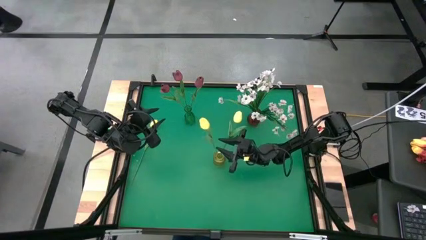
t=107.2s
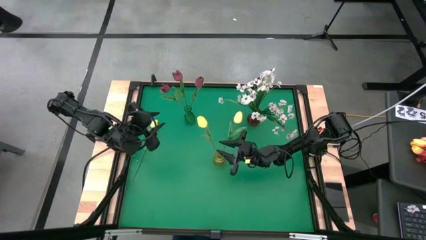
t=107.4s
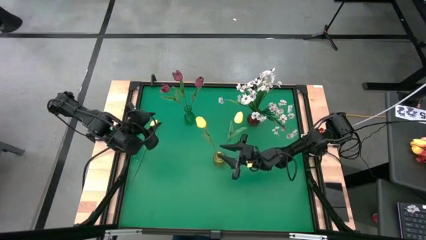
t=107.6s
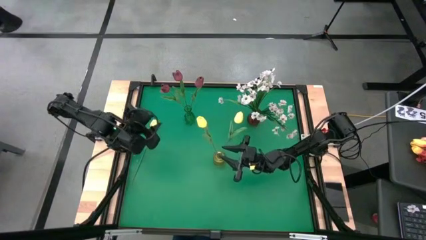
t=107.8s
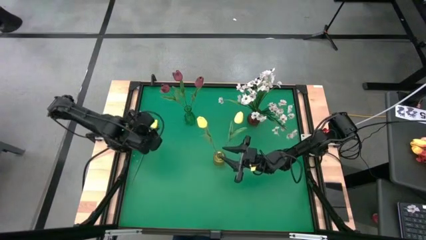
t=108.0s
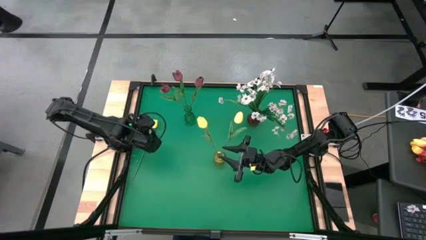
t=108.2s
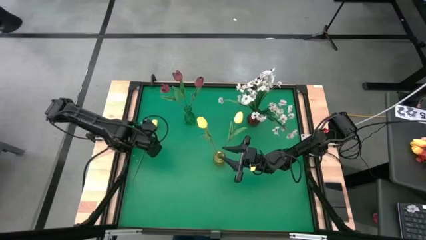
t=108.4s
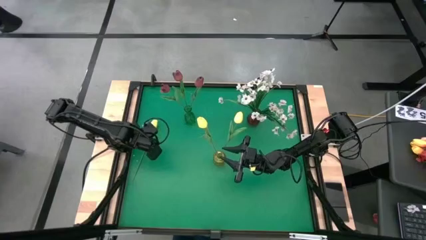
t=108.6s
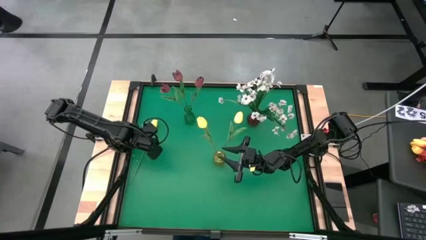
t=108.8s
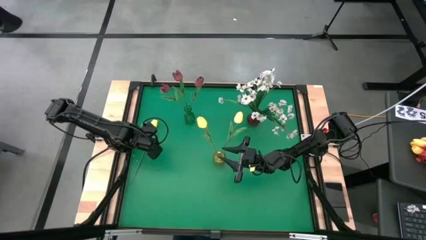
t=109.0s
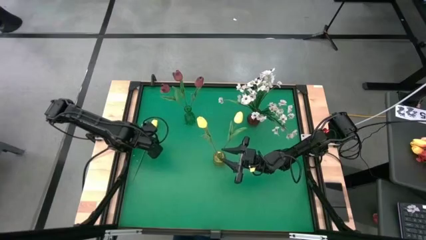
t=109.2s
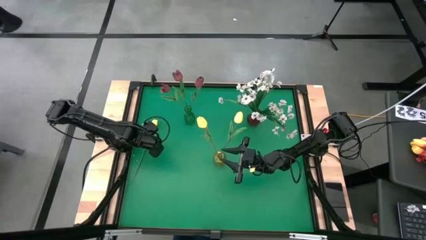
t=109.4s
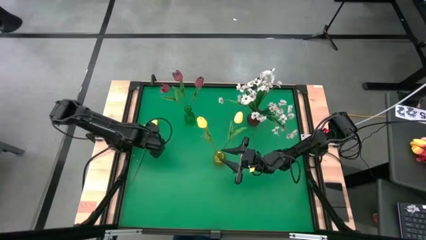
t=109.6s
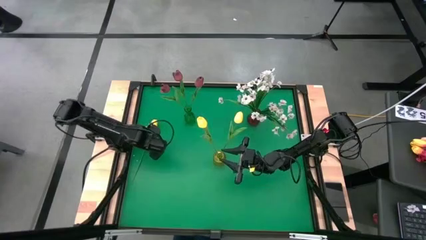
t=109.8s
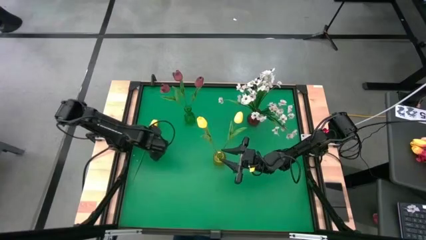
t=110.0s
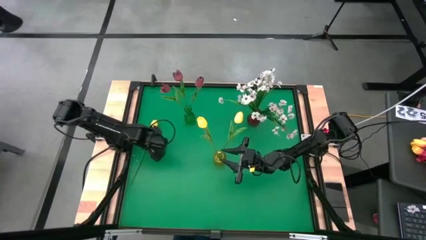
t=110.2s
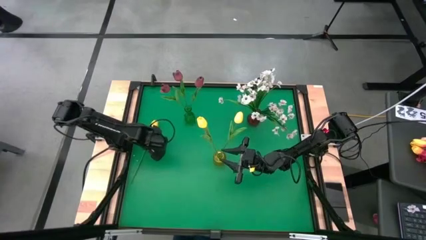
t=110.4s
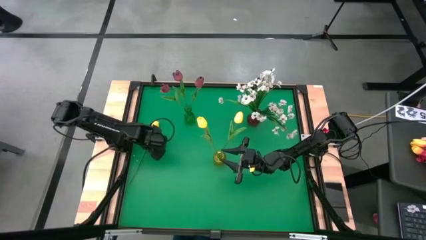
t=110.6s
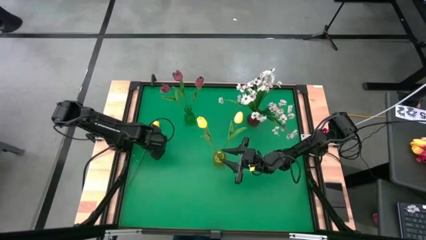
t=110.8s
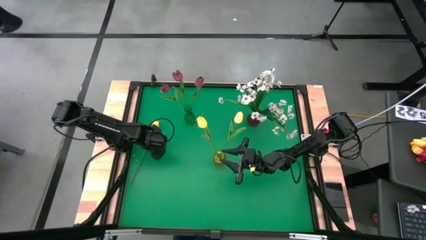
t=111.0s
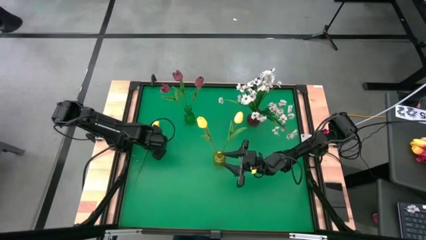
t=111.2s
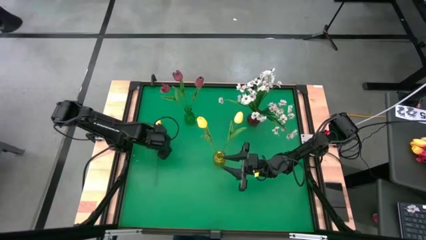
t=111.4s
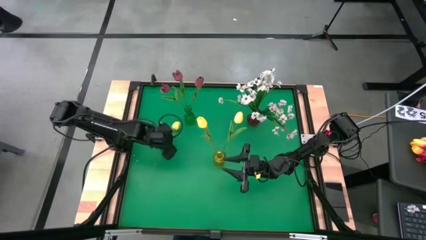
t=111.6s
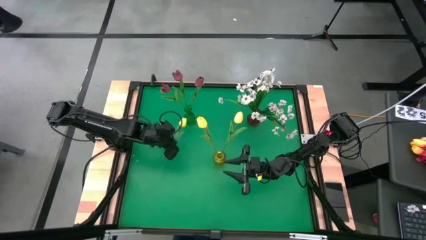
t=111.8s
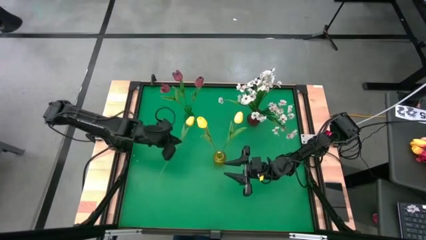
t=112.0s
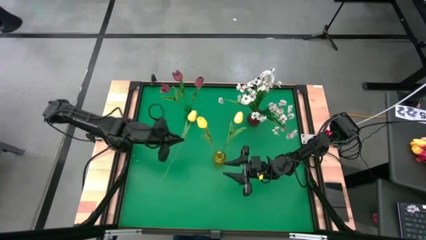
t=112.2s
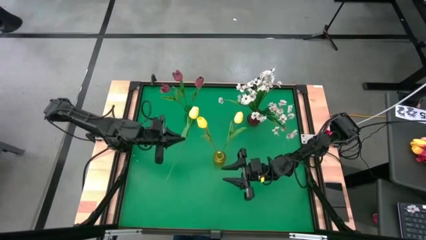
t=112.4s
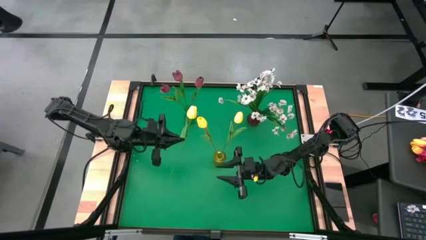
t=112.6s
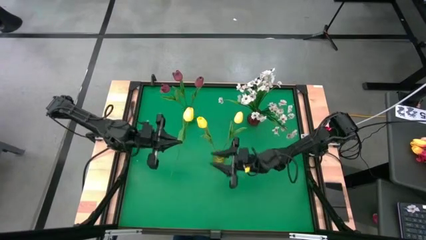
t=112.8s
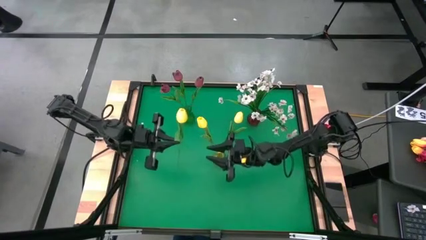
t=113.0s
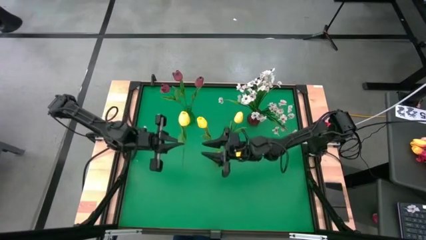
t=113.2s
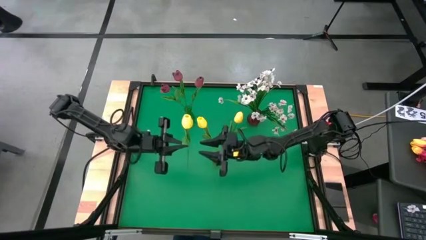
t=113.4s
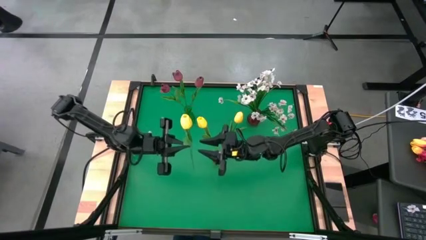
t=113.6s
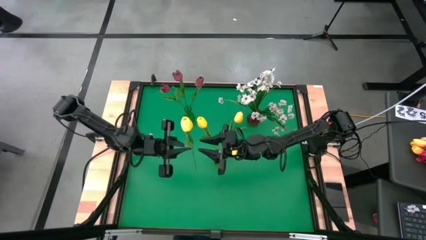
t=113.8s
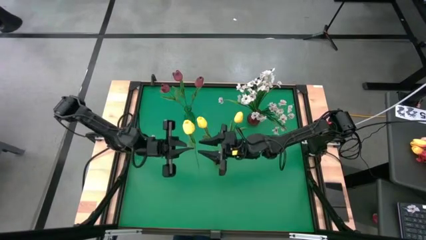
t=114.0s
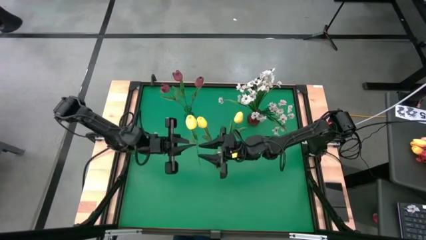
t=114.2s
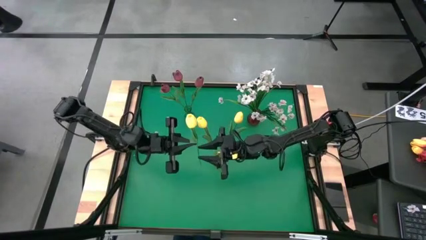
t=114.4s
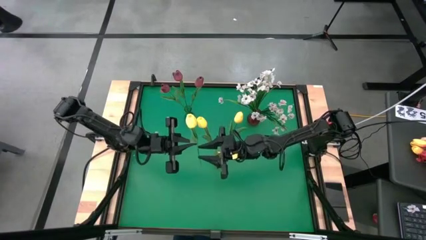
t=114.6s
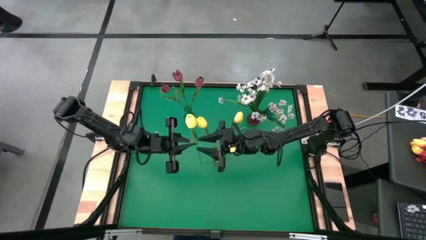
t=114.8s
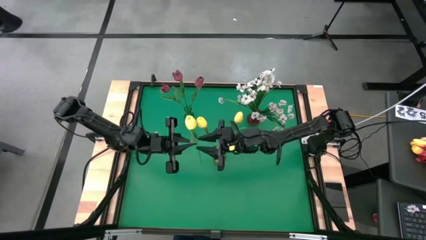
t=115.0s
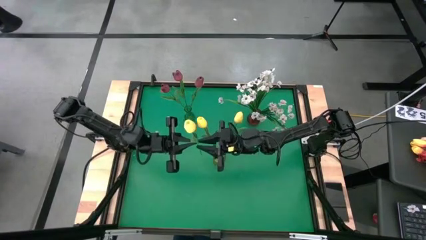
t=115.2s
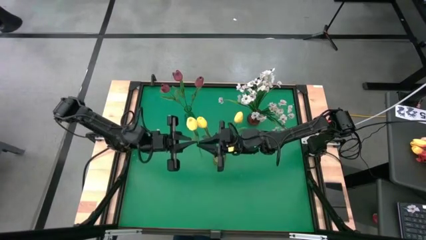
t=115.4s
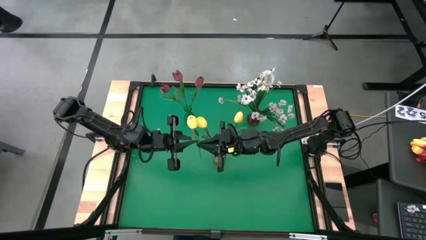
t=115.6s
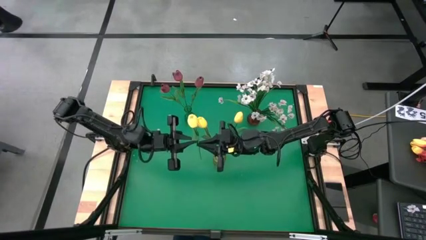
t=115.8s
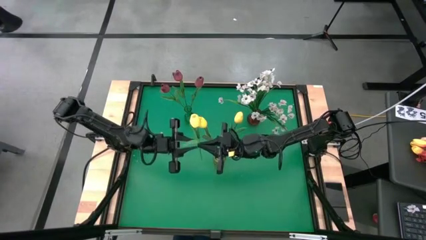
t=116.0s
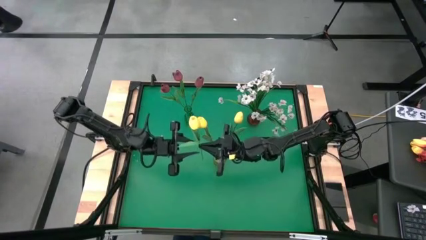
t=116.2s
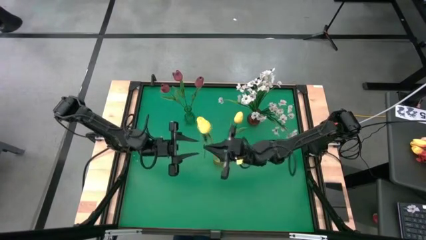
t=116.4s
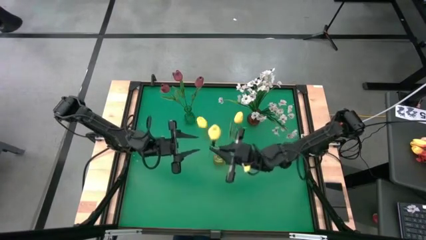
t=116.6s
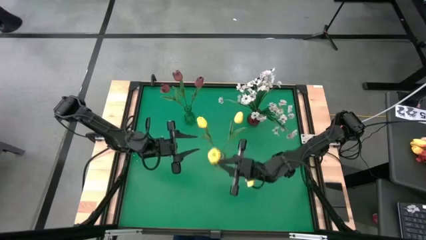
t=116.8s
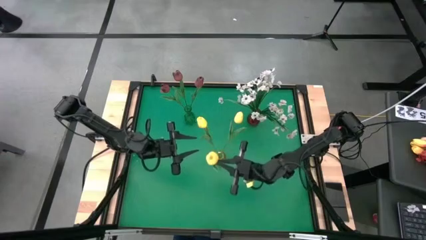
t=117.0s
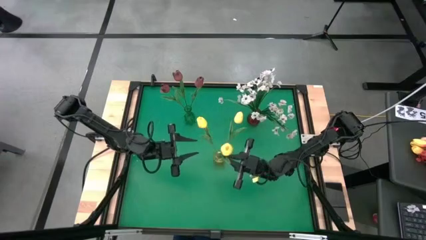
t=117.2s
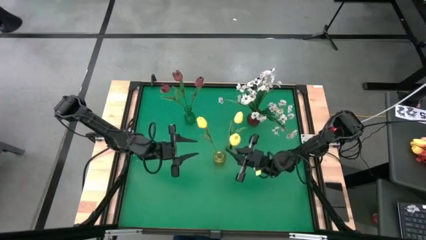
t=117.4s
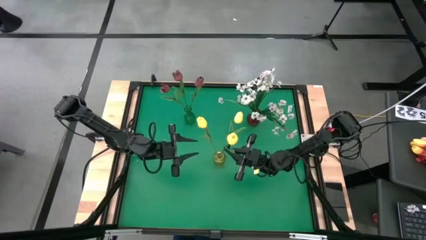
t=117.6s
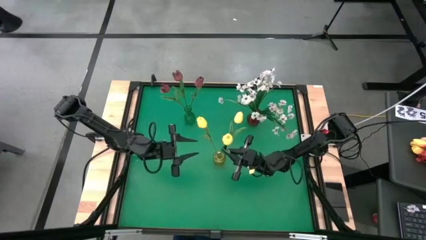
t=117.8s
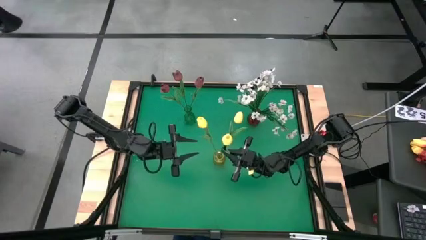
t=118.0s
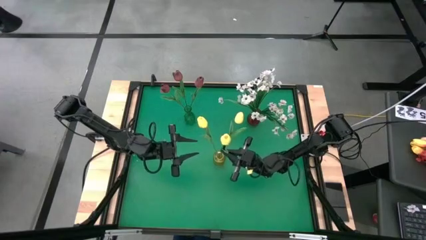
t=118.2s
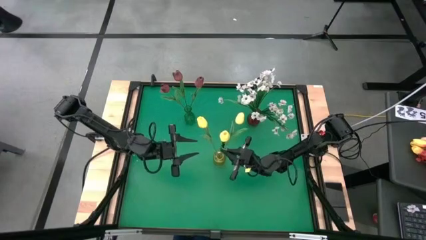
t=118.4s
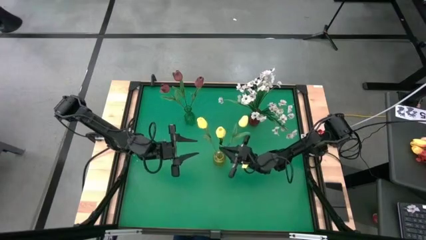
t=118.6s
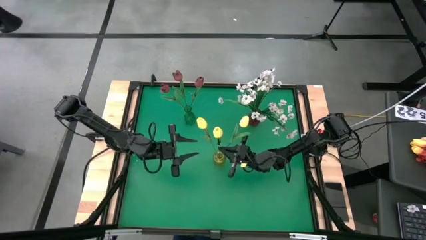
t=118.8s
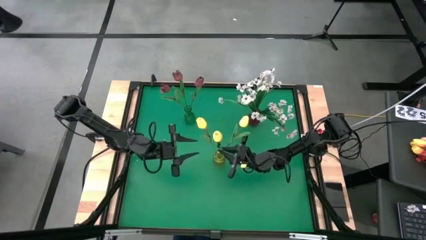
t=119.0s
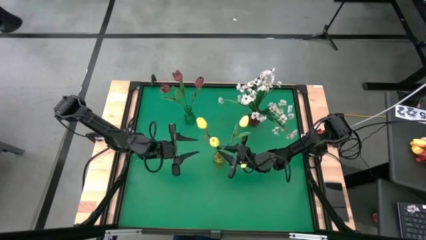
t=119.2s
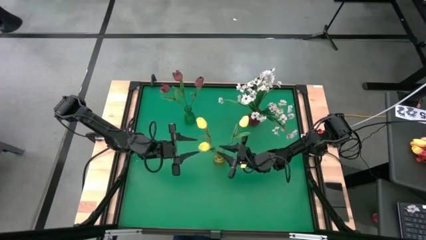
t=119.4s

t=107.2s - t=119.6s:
Task: Sort flowers into vase by color
Put the yellow flower into the yellow vase

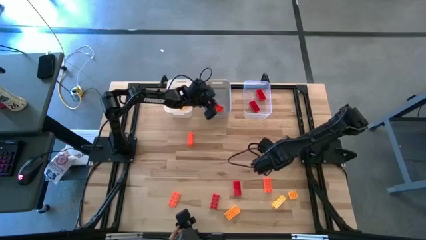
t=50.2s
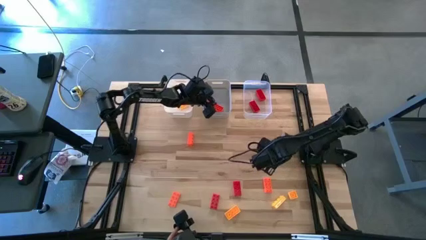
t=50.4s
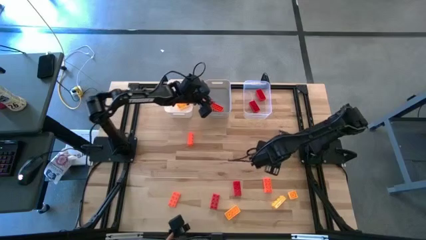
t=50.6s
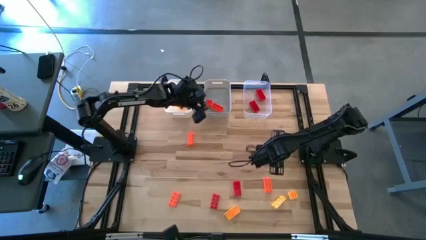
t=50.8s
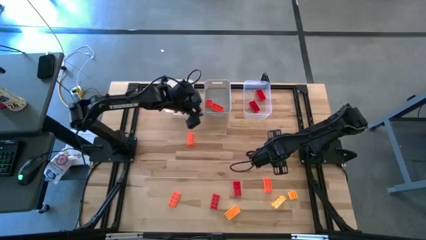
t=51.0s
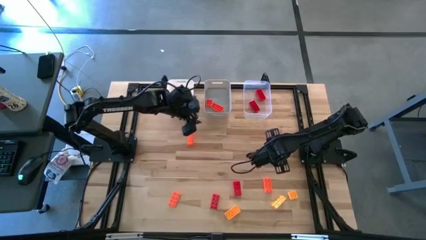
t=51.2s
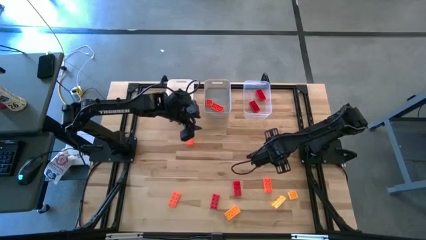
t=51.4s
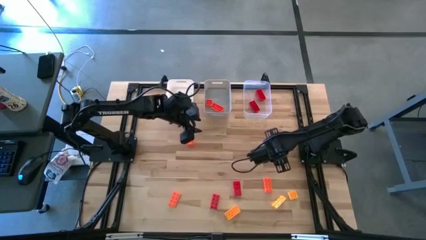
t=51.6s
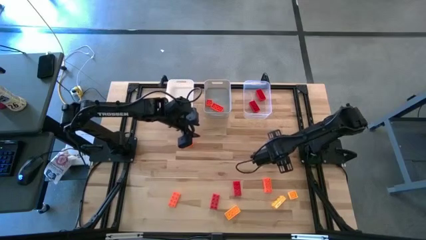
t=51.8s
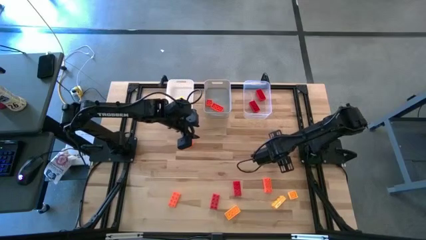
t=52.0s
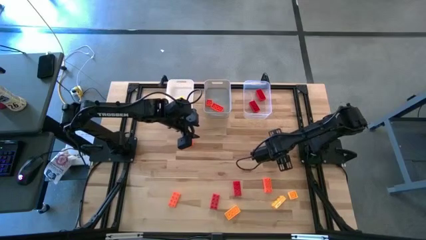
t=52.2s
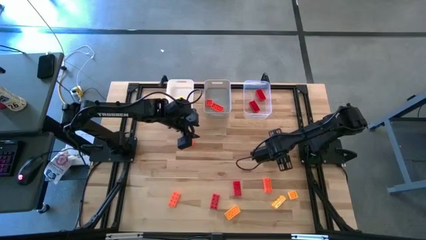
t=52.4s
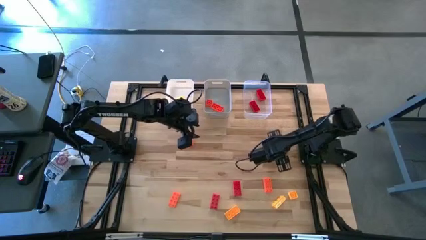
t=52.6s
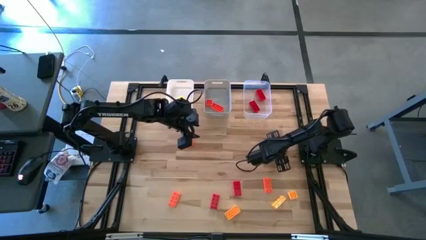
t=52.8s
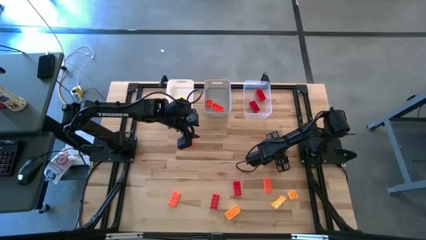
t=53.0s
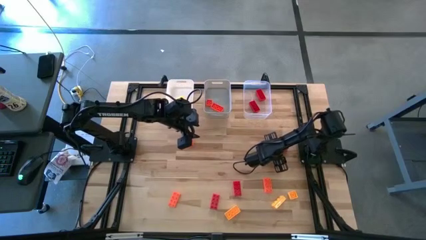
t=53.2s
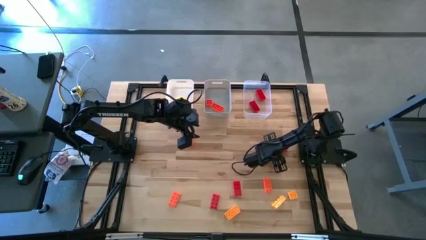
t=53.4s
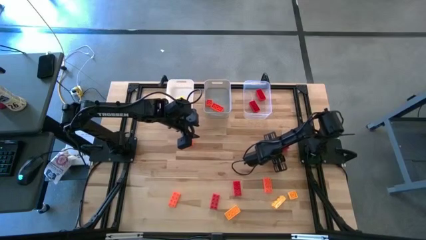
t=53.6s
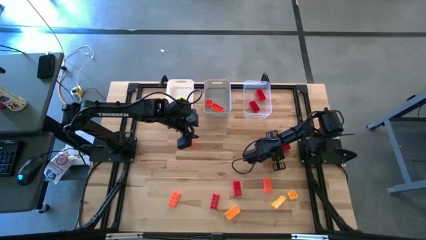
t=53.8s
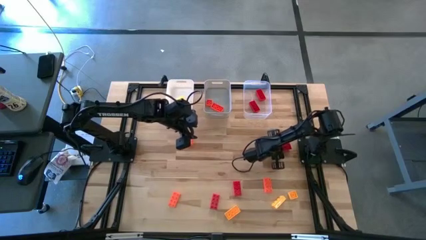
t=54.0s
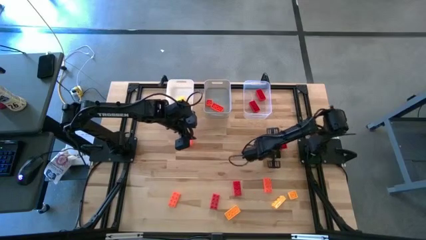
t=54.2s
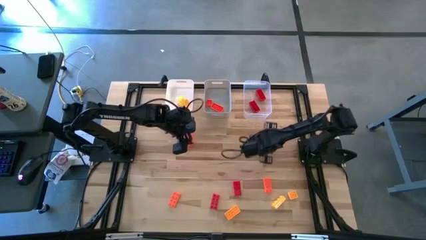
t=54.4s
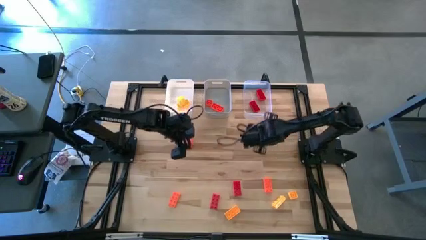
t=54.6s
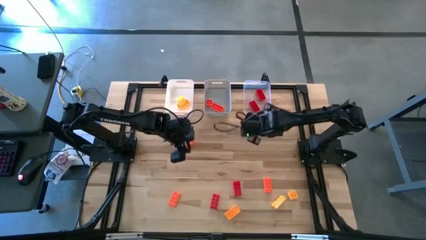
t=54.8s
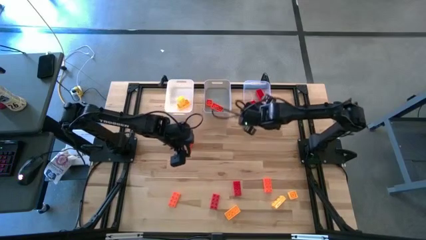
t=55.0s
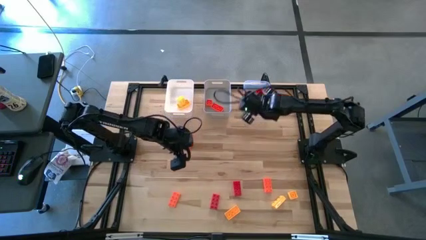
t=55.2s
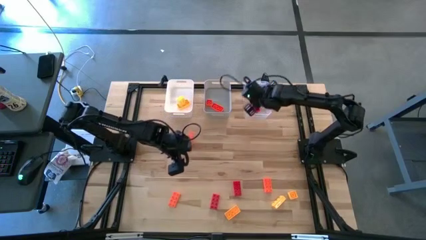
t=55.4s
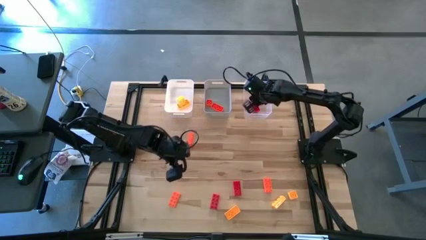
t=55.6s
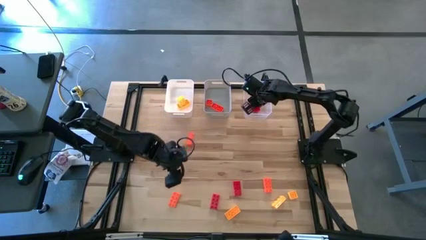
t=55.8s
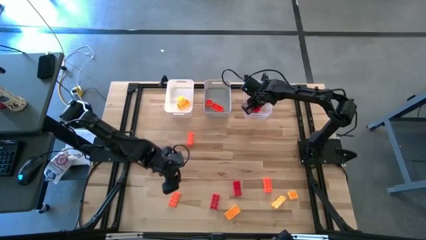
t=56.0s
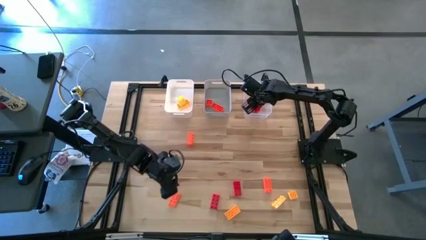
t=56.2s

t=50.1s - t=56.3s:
Task: Sort & place blocks by color
Put the red game piece into the transparent bin
